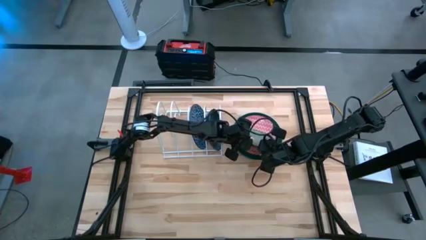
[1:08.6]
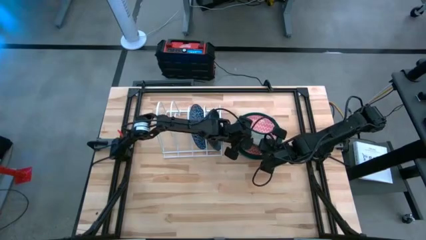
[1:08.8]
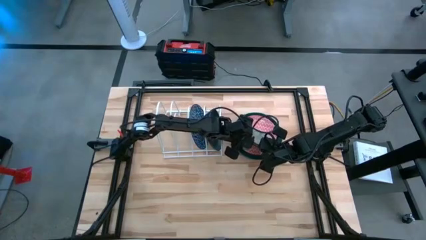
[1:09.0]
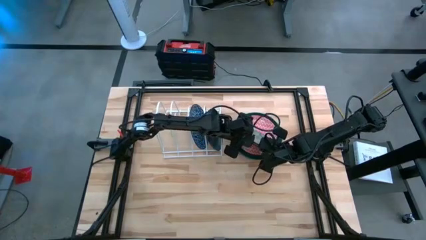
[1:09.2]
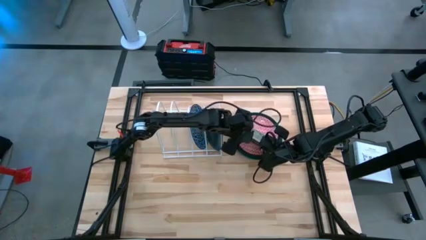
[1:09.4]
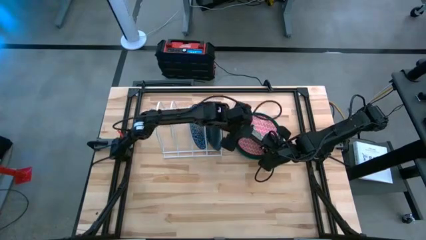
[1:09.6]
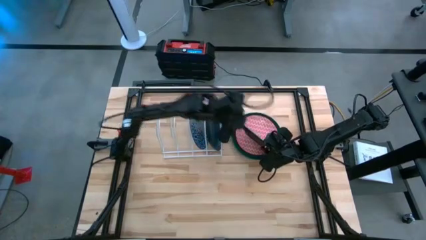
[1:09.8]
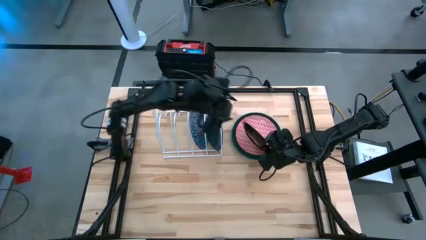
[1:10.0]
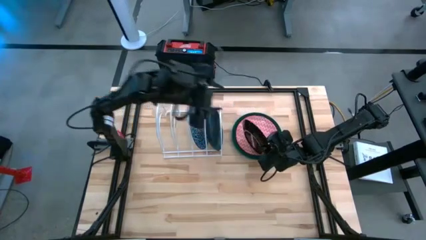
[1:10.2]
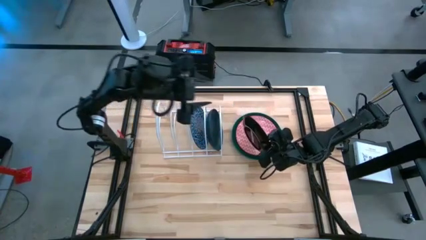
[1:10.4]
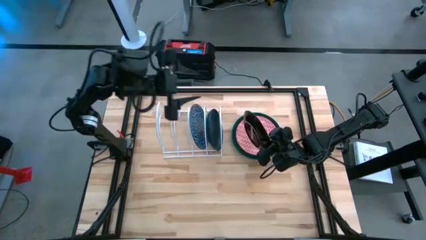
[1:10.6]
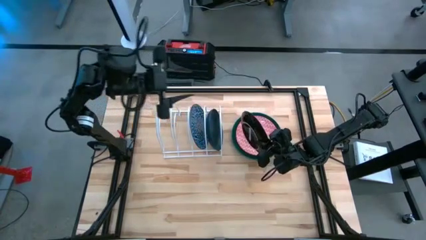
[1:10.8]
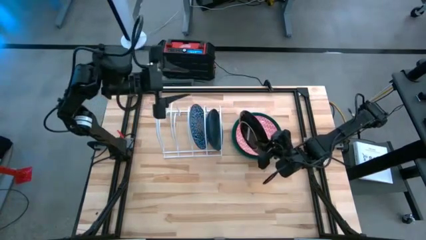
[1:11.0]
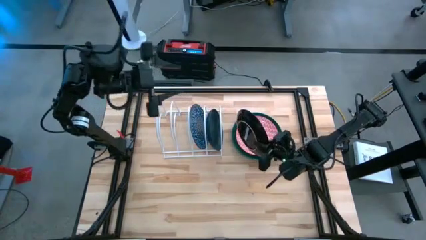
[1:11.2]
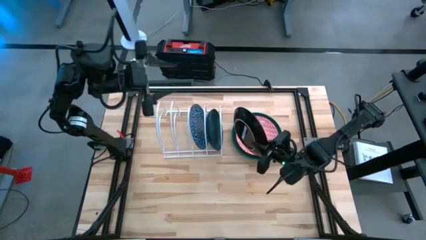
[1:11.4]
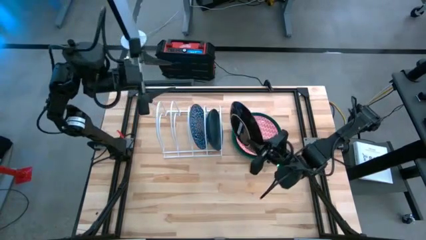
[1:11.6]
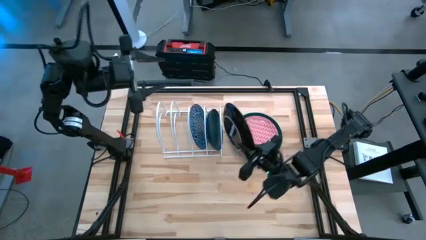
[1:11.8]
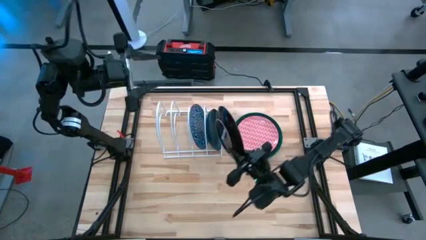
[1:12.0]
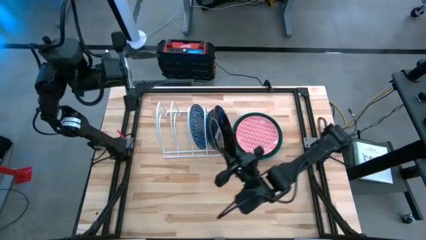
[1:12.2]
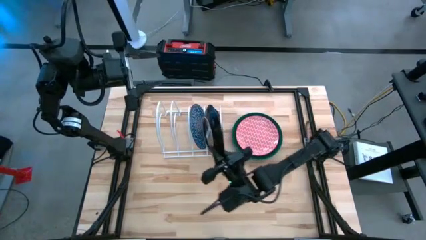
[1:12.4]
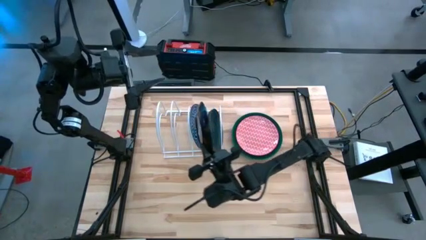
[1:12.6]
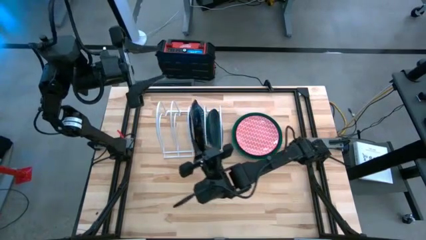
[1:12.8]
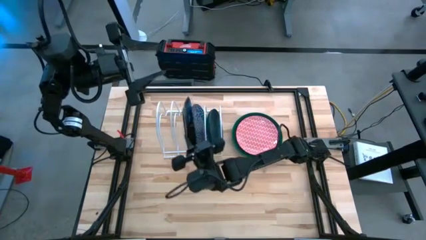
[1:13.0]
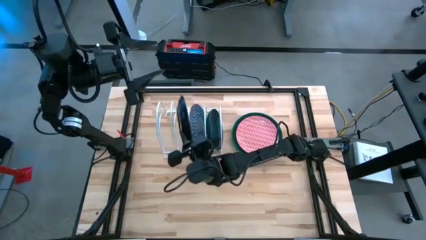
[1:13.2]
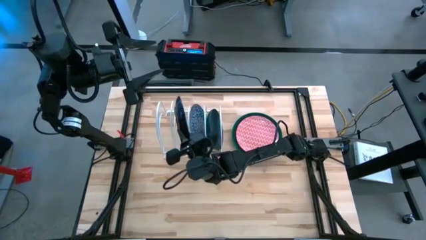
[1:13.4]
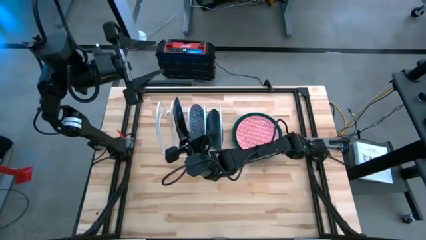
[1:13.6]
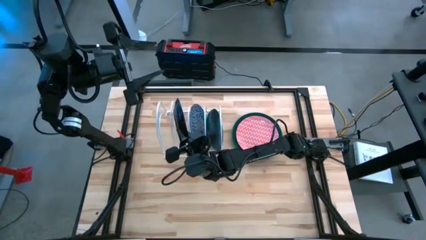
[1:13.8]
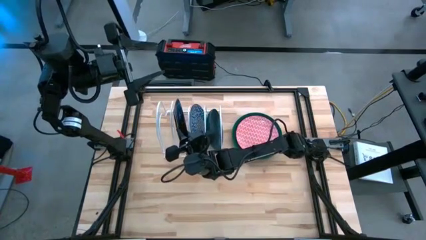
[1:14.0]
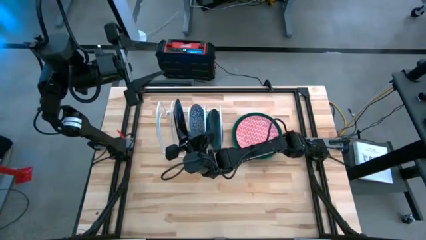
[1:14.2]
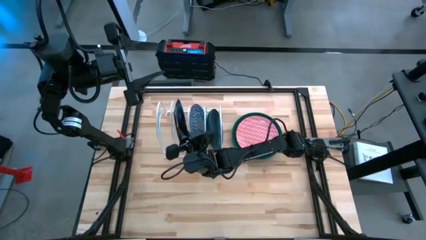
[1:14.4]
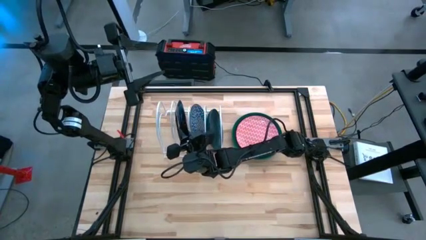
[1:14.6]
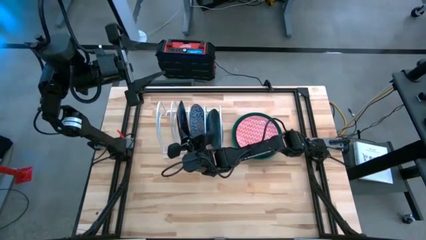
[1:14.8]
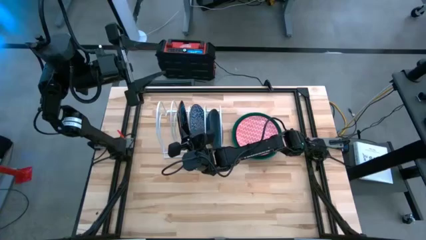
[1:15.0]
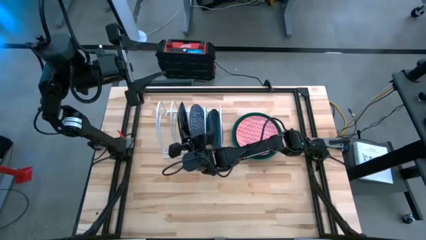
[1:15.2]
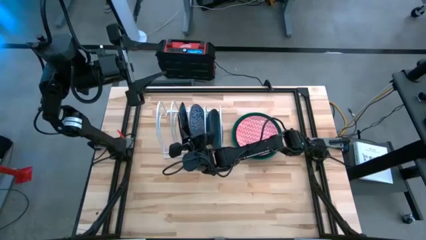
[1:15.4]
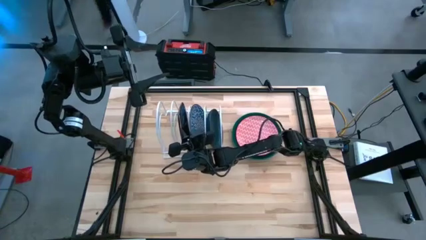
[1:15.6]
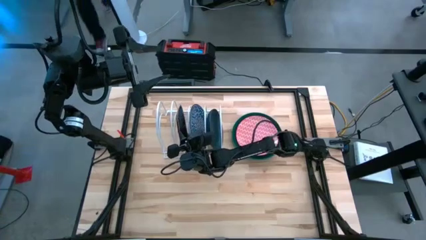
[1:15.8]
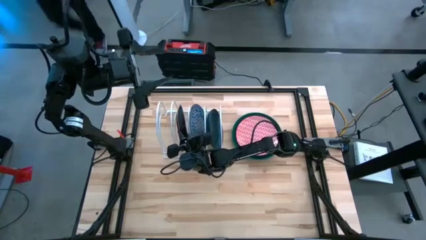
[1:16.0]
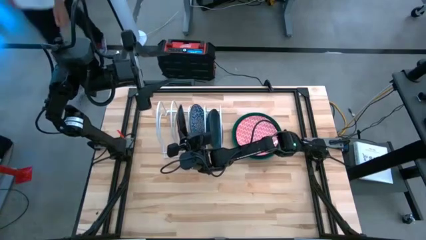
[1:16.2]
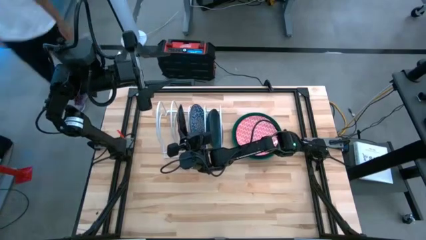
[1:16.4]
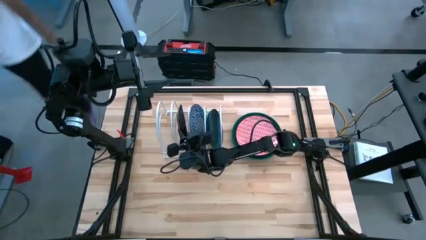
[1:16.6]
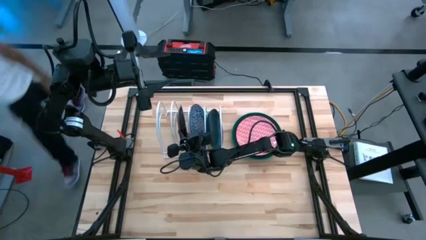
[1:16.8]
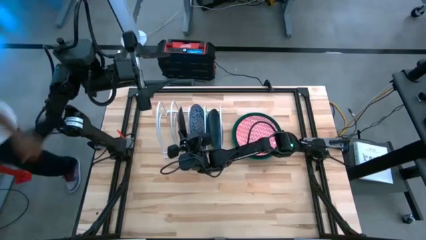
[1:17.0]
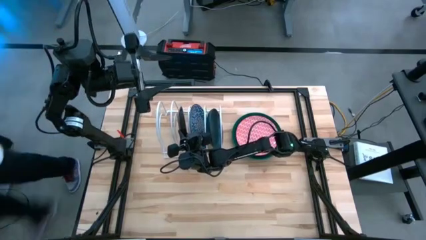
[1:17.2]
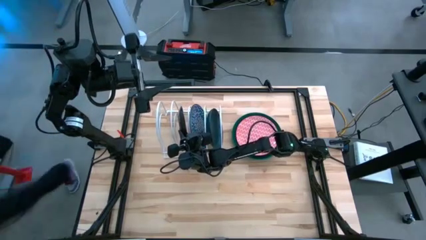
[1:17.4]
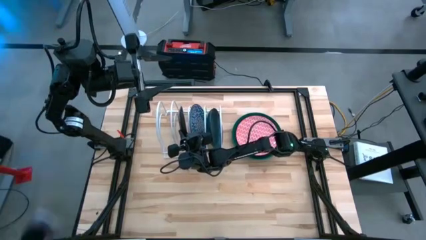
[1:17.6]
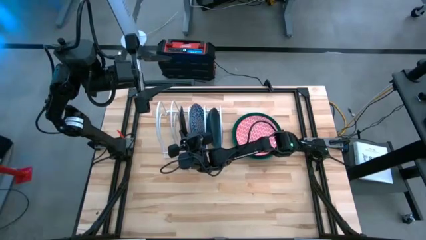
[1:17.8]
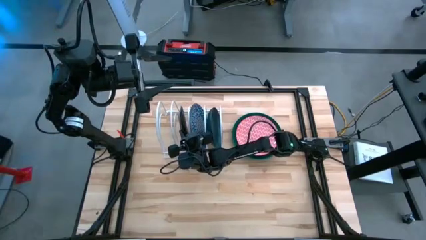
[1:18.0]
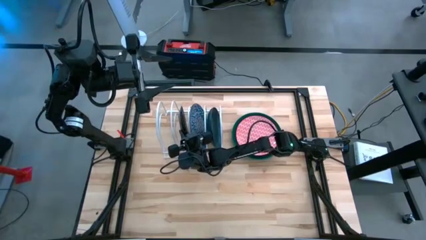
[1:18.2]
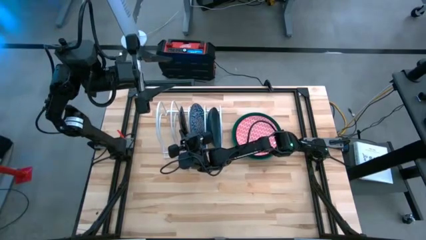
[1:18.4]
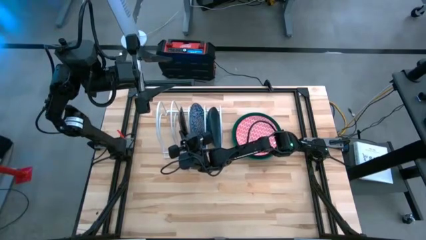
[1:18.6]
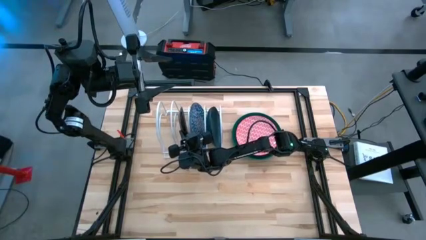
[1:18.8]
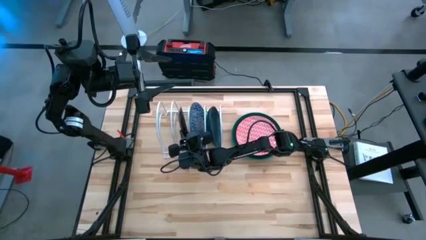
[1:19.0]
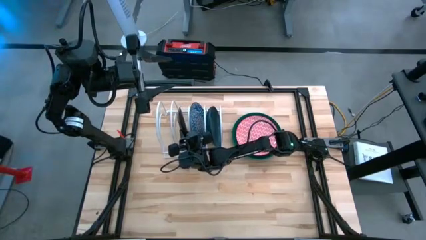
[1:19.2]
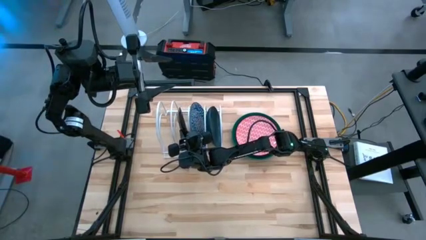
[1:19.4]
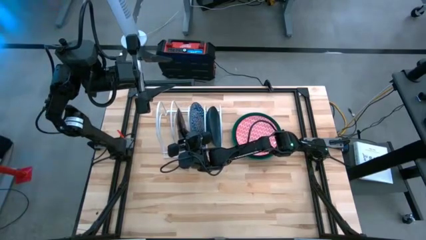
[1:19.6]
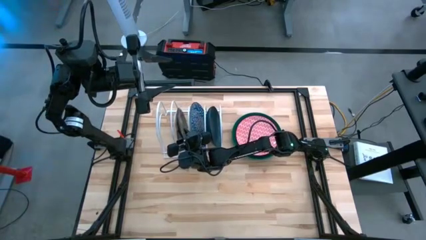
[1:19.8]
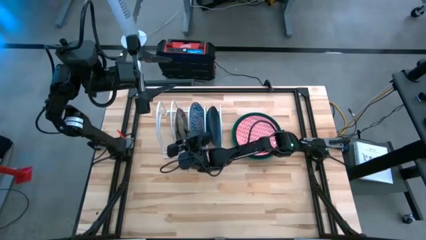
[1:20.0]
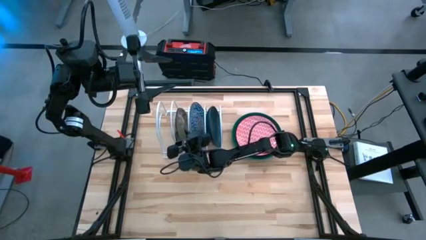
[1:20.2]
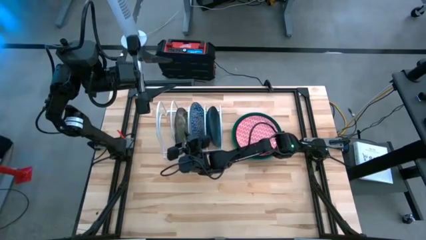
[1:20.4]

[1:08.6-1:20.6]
Task: Sort dishes
Put the green patterned plate into the dish rack

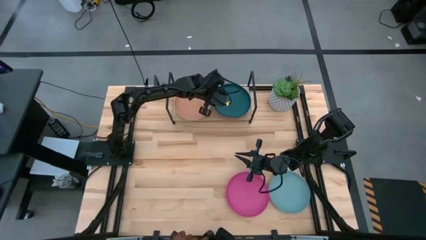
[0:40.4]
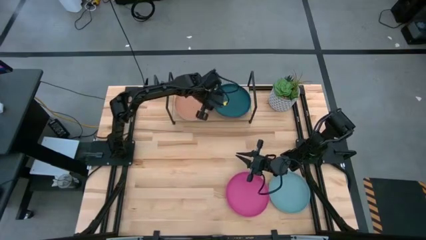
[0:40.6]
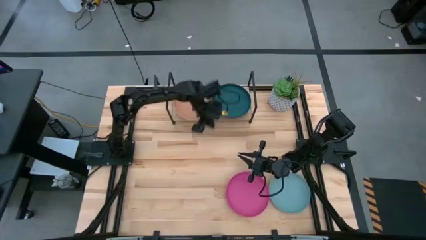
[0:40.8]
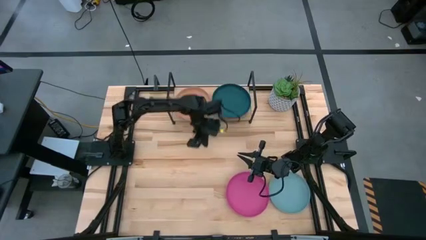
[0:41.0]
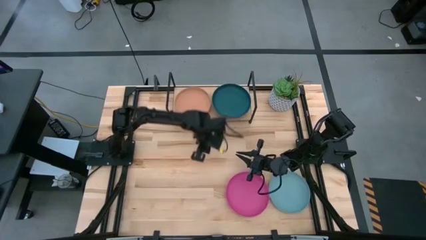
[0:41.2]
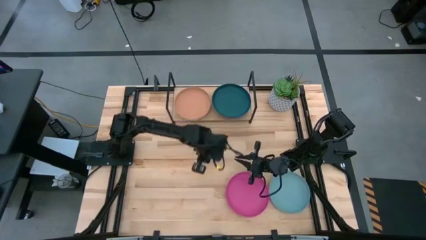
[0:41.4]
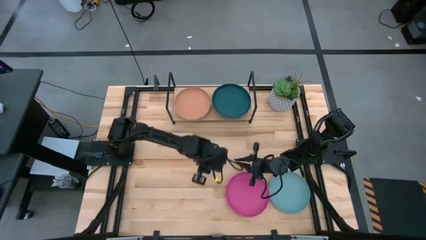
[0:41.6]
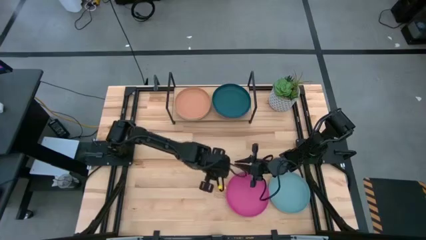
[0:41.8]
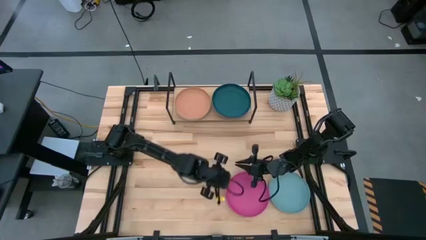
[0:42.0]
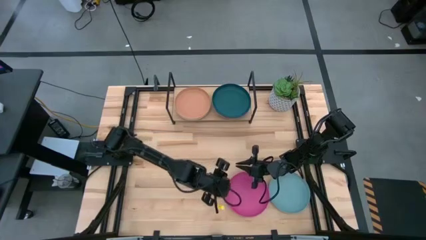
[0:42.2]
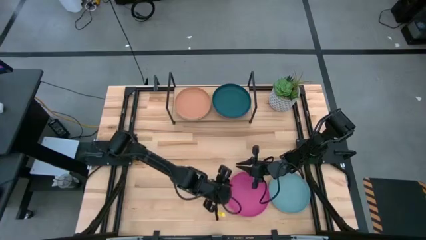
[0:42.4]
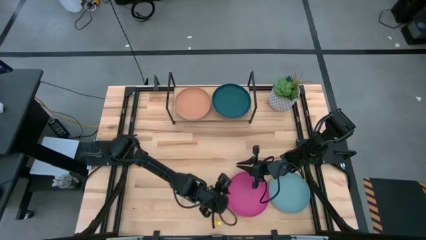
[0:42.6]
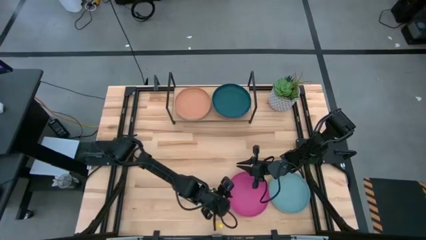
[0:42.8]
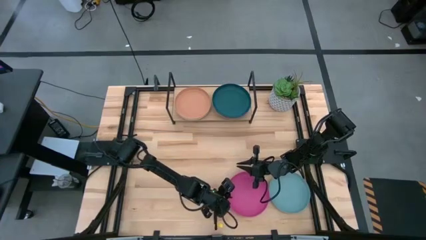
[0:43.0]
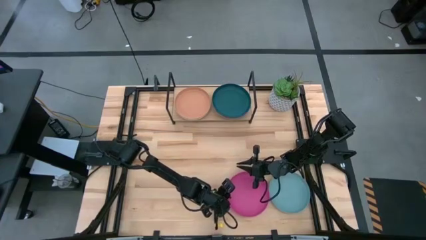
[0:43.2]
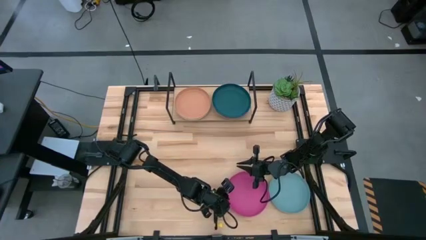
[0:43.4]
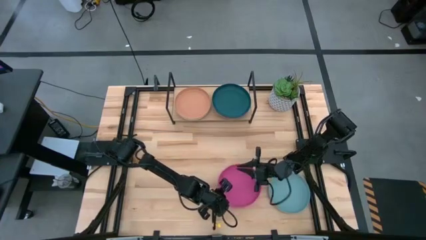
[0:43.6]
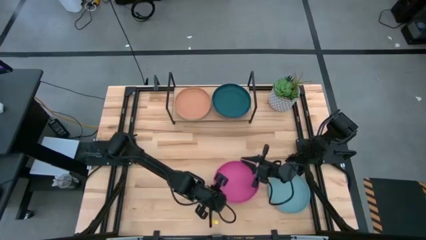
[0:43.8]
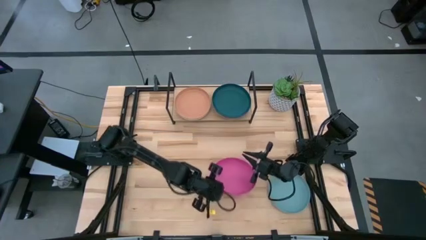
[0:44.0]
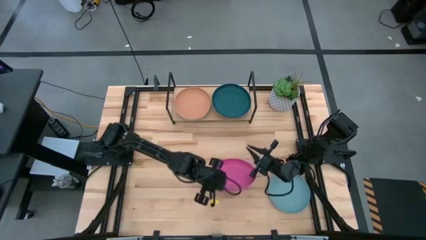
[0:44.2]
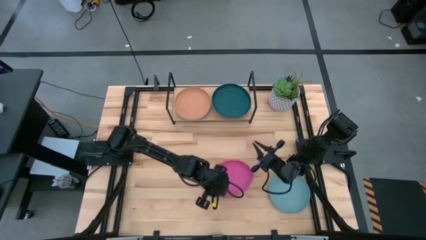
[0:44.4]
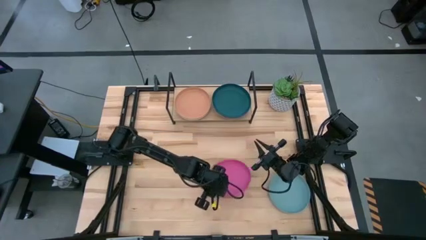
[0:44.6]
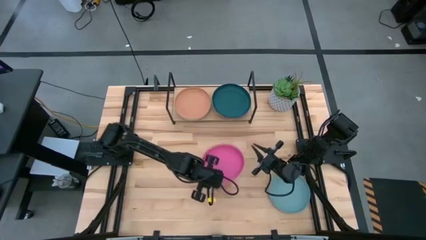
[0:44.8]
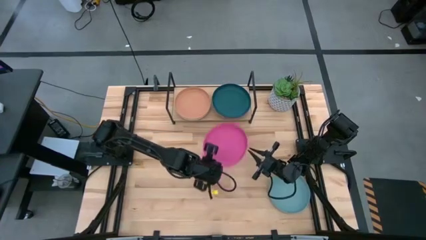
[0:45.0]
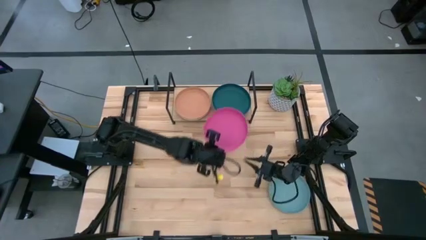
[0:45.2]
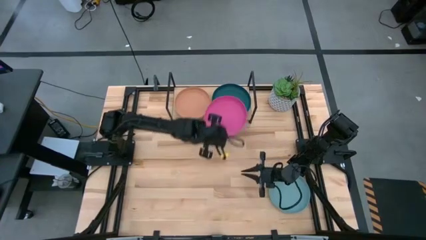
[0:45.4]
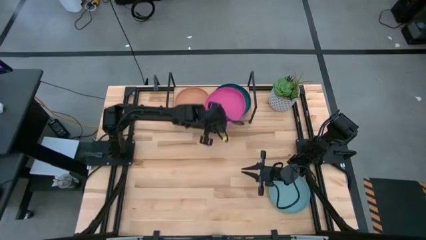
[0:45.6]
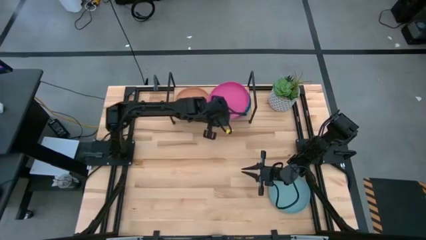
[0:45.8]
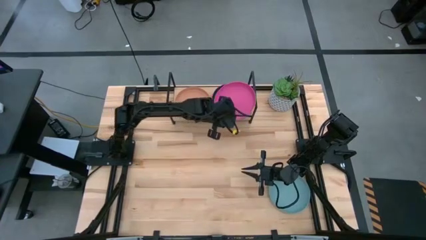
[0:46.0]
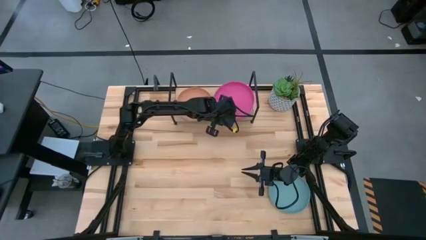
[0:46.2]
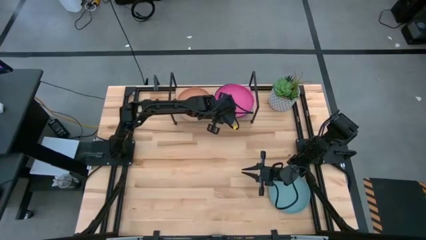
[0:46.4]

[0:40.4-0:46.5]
Task: Place and stack plates onto a shelf
Stack the pink plate on top of the the green plate on the shelf
